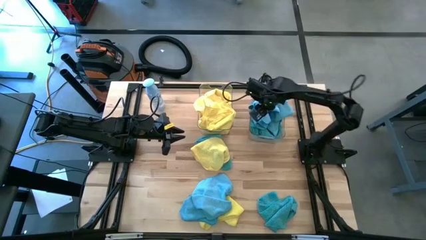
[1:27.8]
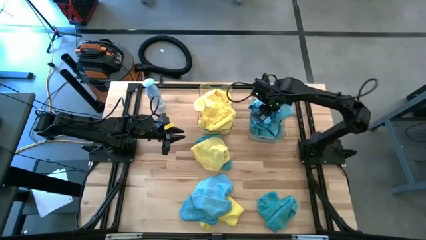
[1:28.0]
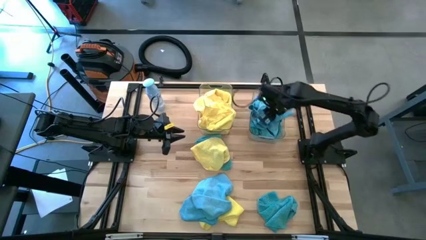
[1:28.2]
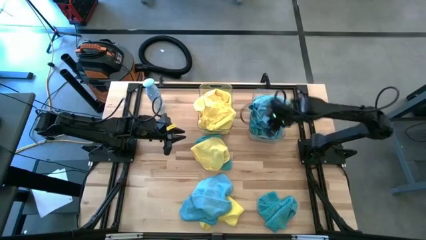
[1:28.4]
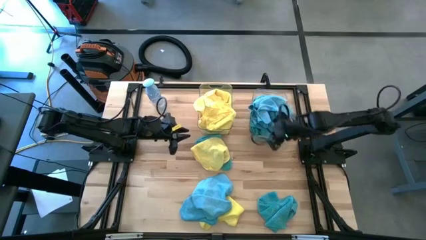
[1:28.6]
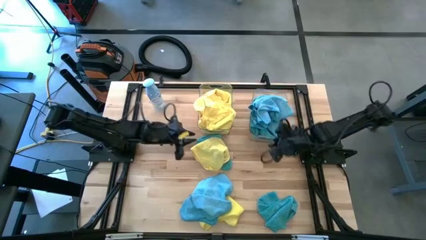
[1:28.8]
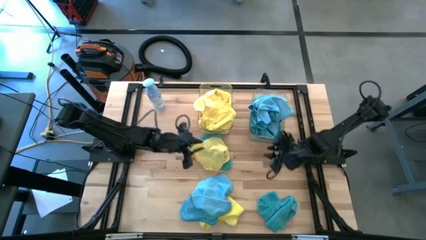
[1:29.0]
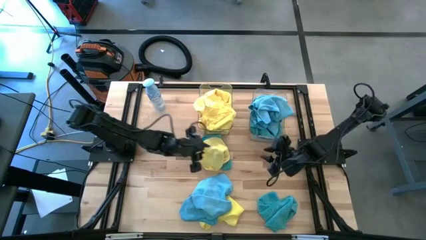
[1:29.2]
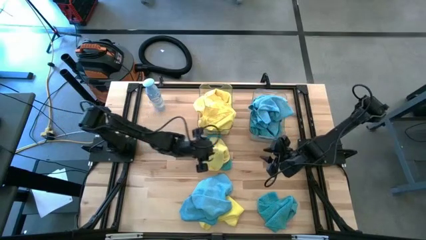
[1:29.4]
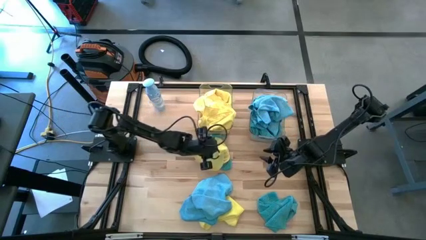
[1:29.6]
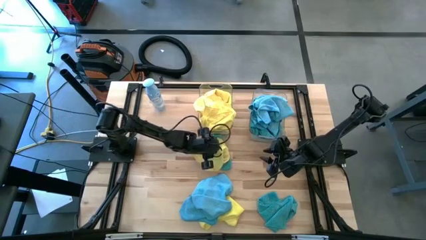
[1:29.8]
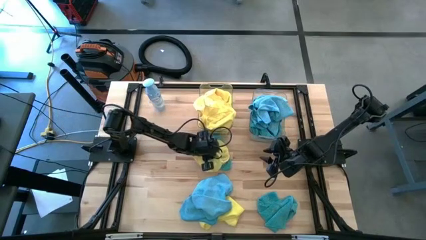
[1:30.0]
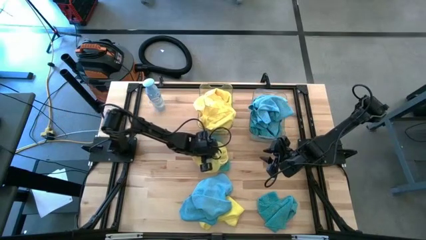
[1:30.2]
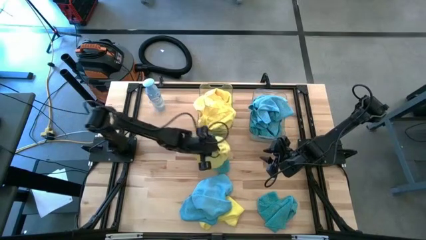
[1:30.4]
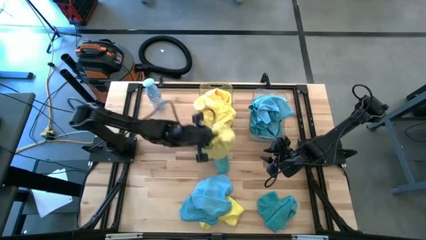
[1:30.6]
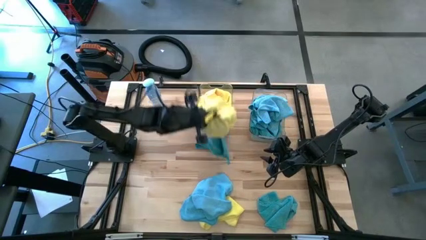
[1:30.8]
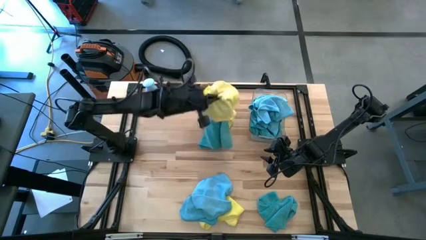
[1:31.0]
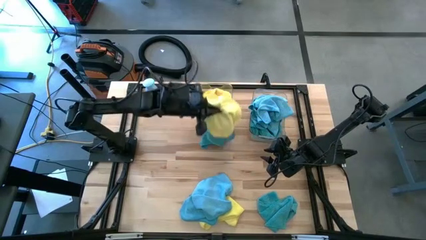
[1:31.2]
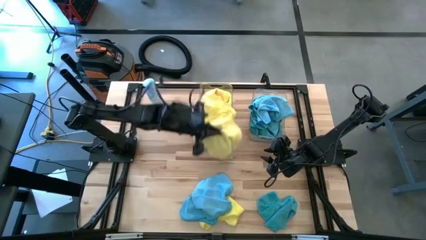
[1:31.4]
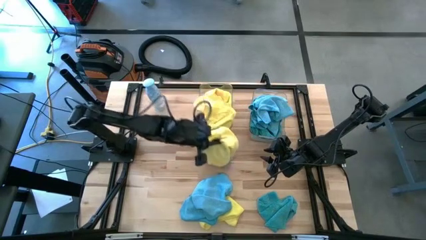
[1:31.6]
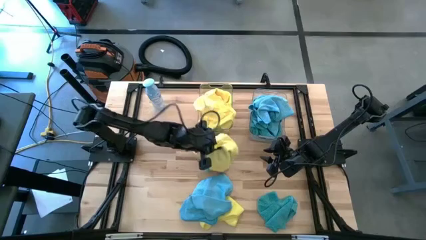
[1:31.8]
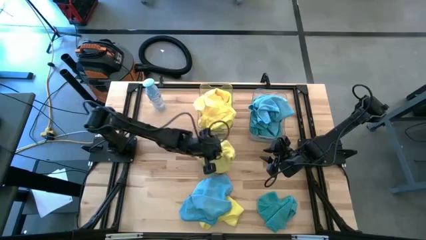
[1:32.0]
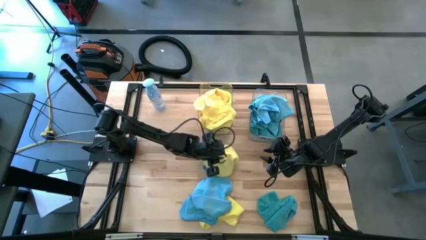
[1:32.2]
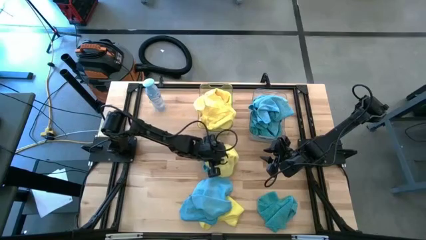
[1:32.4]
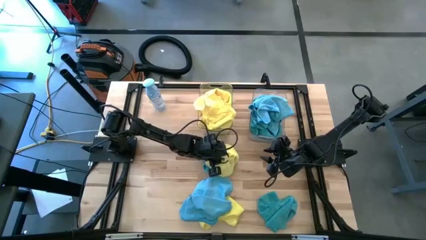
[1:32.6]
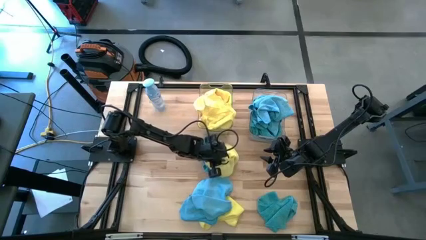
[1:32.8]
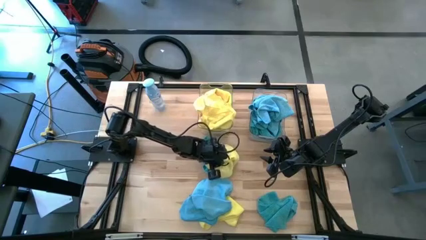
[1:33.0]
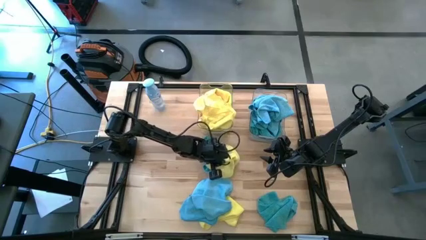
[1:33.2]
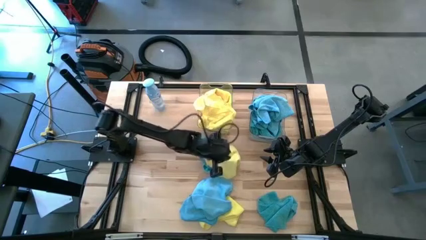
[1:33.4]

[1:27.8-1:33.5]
Task: Sort microfiber towel by color & place in baskets
Put the yellow towel into the left transparent bin

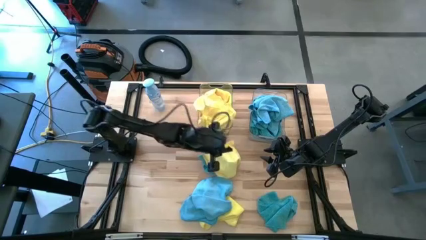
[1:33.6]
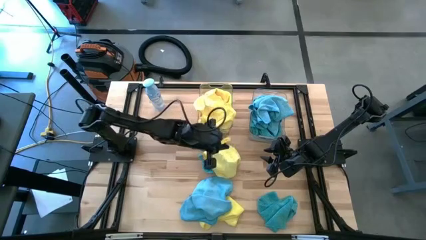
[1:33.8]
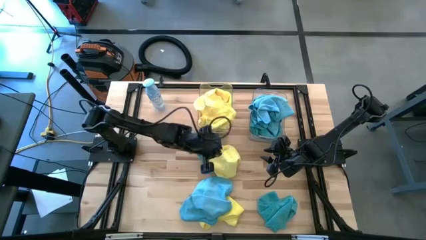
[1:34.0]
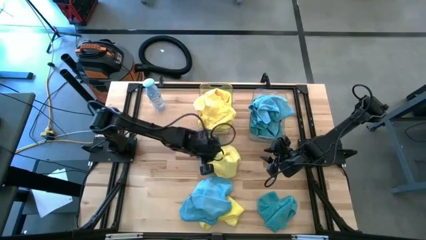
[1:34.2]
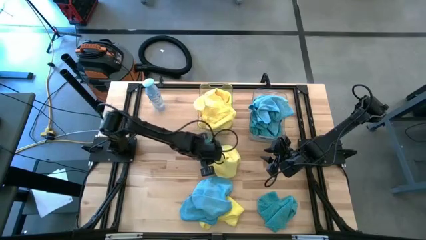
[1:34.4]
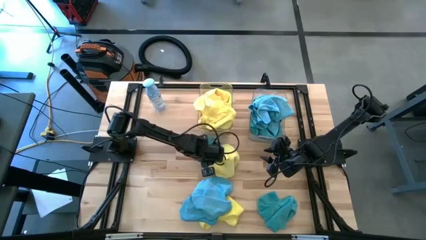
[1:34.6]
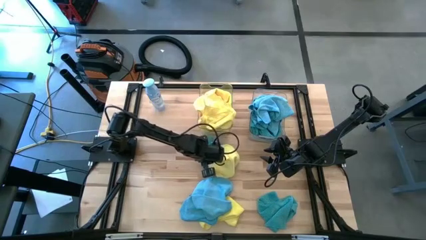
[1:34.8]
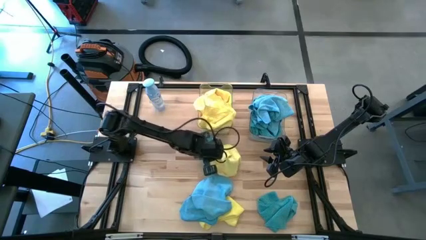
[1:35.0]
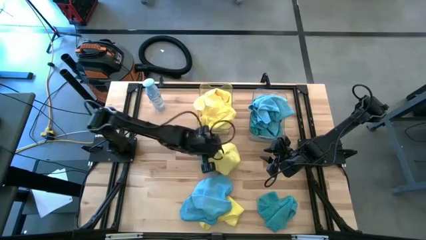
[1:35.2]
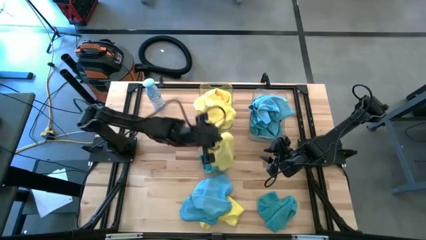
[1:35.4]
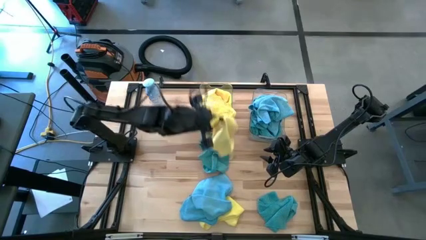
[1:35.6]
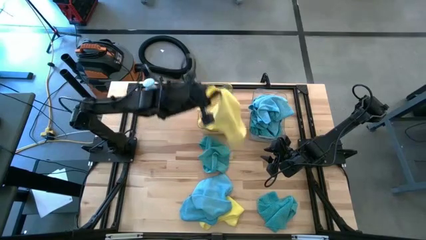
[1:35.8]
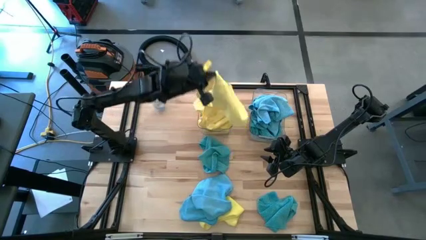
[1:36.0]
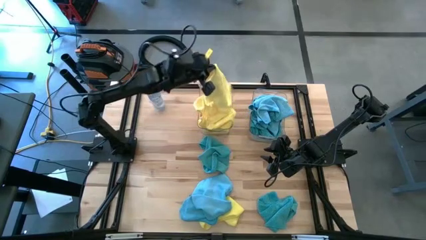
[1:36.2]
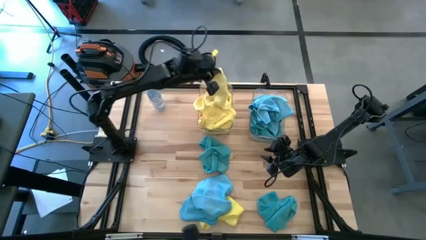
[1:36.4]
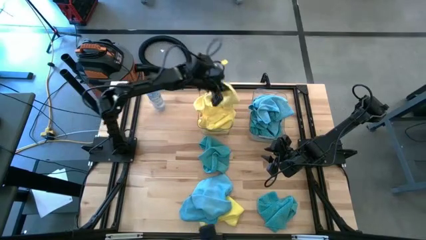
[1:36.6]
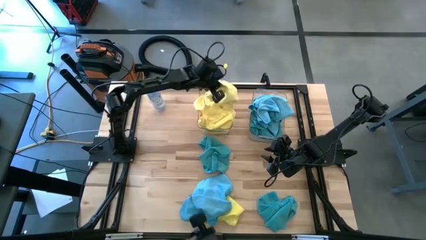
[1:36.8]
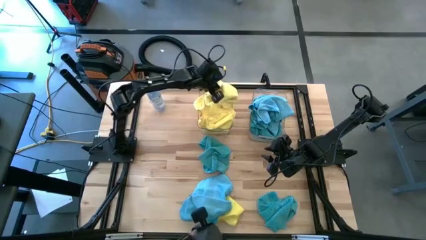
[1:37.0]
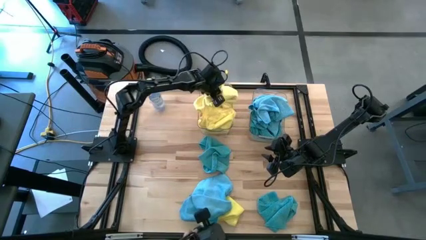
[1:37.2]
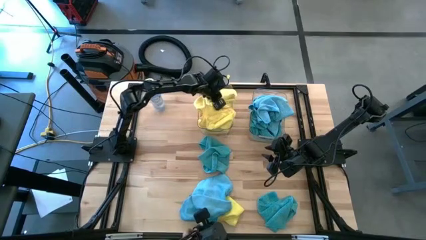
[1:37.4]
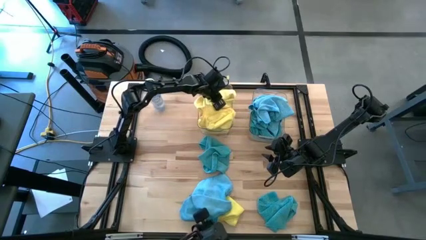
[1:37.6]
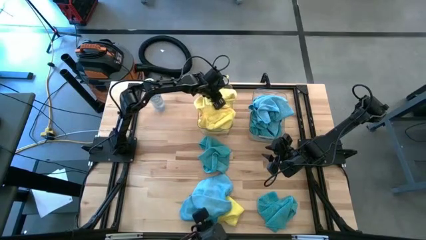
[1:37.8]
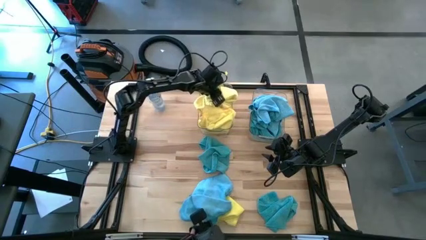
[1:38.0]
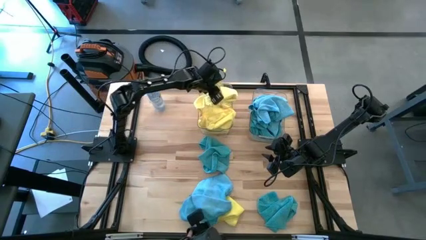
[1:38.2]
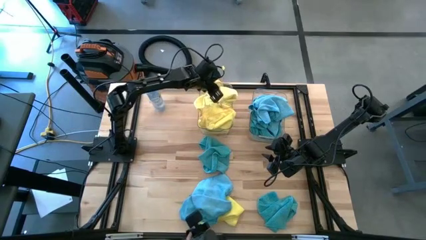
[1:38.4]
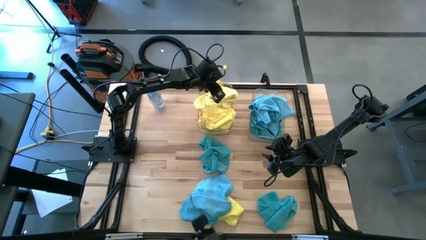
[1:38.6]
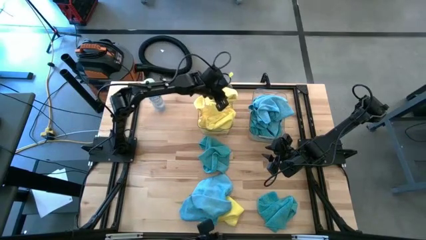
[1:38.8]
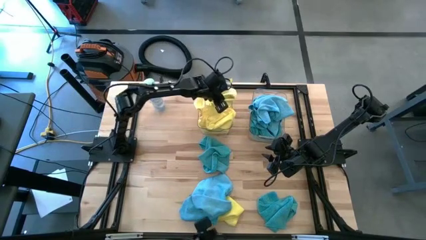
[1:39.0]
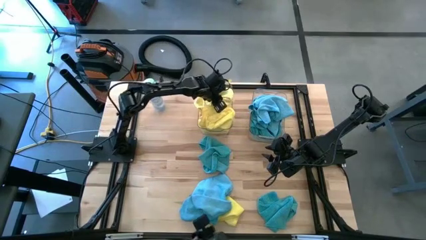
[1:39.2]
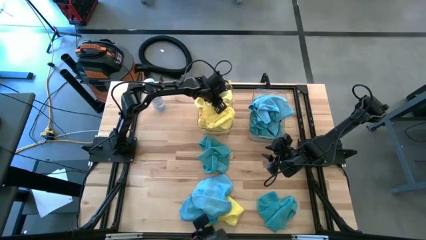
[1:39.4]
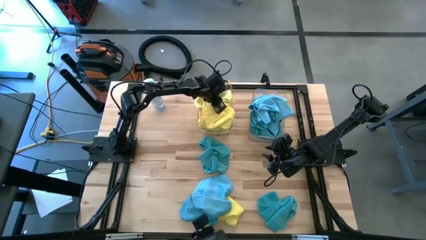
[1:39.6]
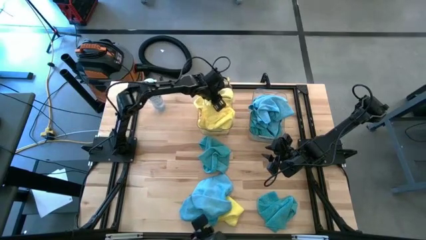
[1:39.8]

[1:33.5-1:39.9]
Put the yellow towel into the left transparent bin

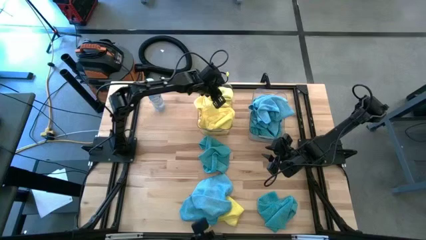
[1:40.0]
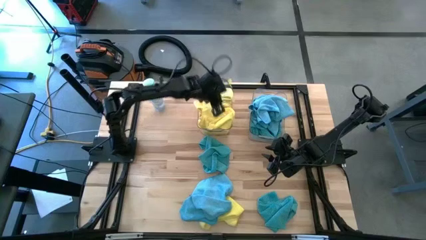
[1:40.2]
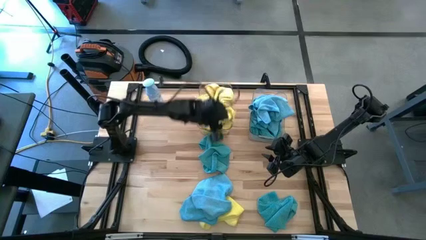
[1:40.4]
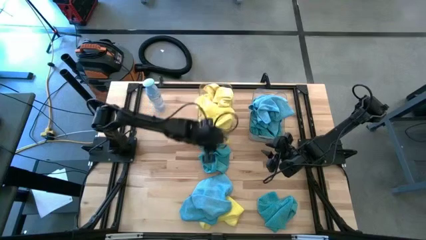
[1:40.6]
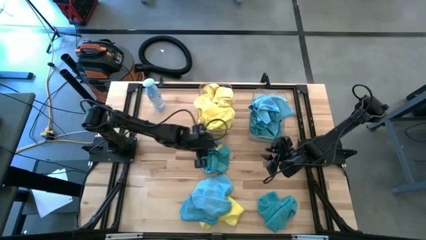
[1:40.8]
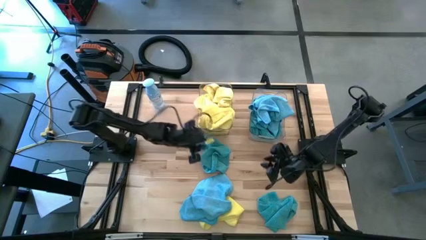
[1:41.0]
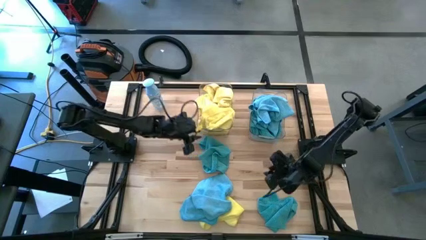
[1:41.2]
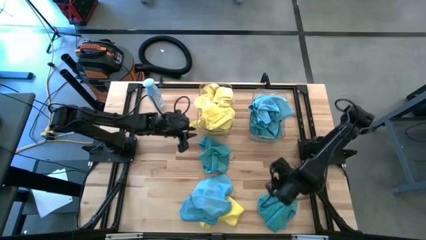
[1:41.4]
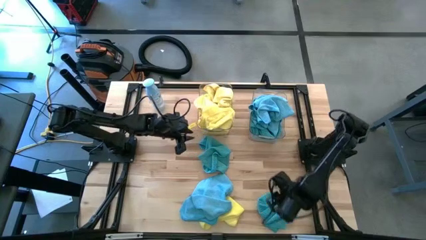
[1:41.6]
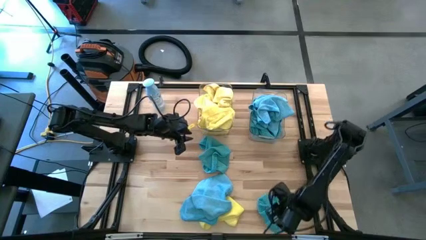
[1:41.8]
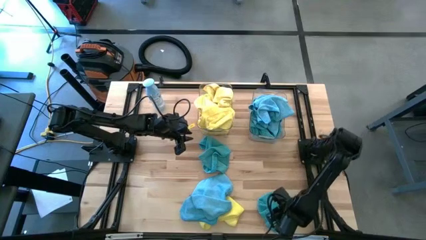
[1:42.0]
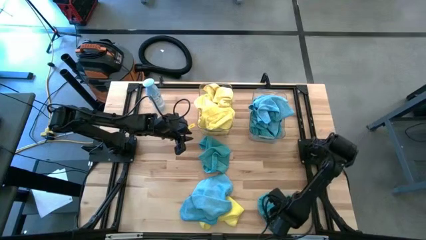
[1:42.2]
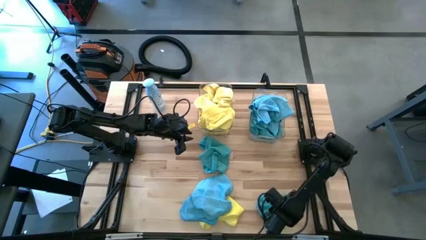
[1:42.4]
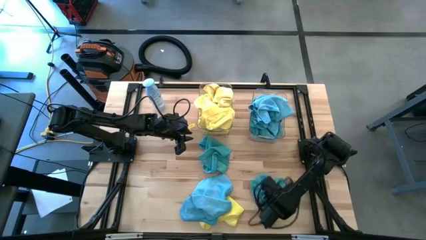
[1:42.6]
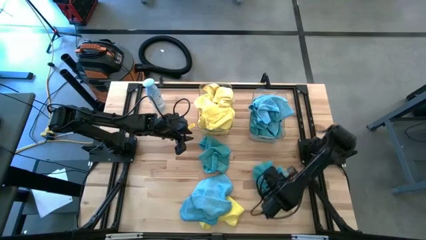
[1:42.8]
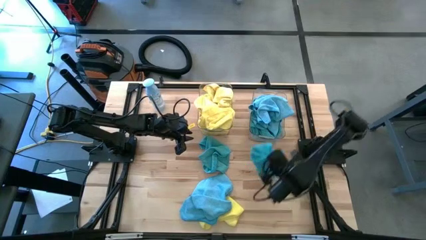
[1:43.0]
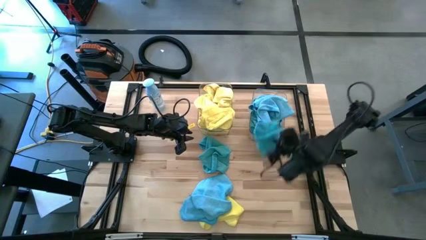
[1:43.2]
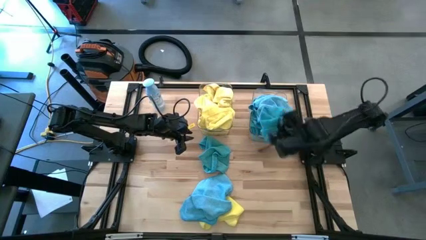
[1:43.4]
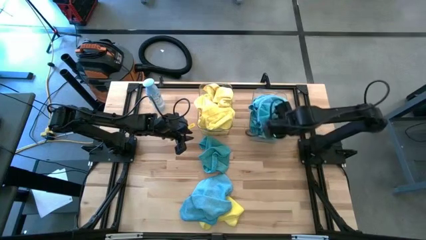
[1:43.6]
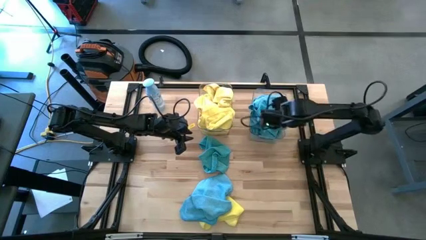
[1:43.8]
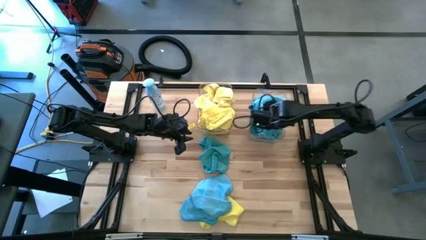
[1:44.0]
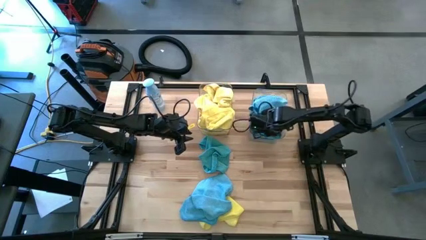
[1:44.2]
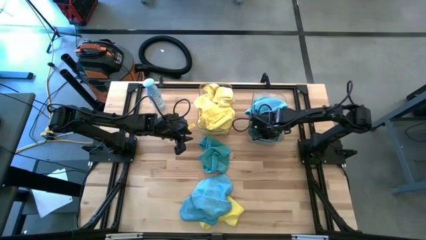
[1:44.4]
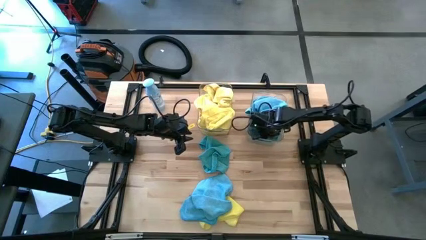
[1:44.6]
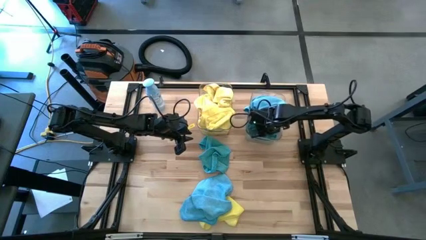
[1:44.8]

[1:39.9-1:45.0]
Put the blue towel into the right transparent bin
